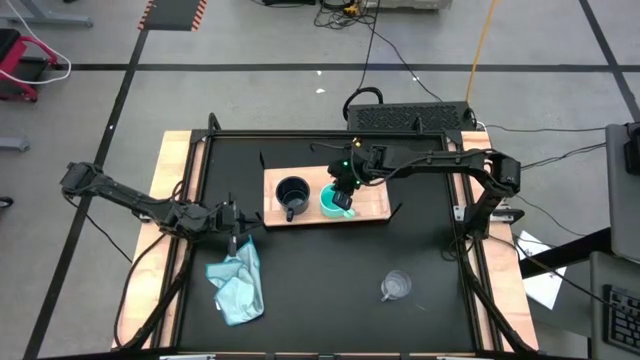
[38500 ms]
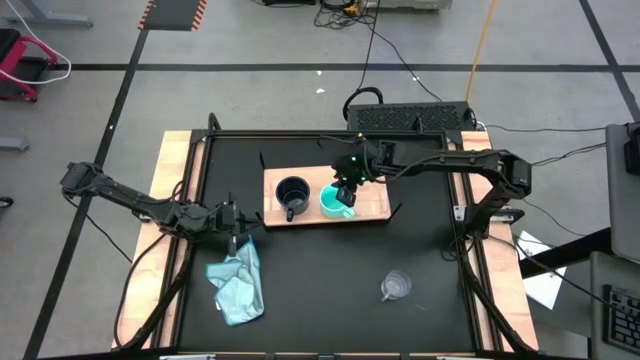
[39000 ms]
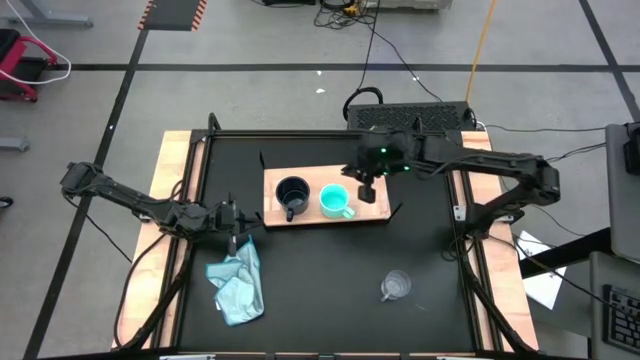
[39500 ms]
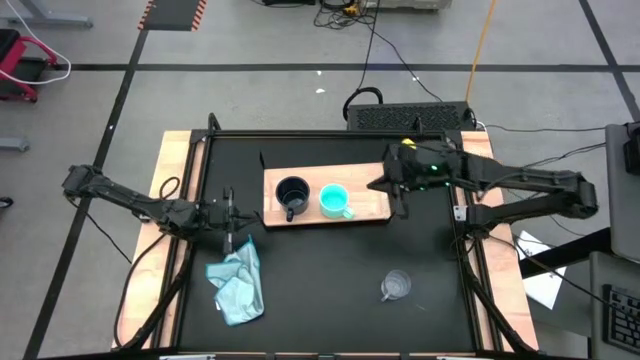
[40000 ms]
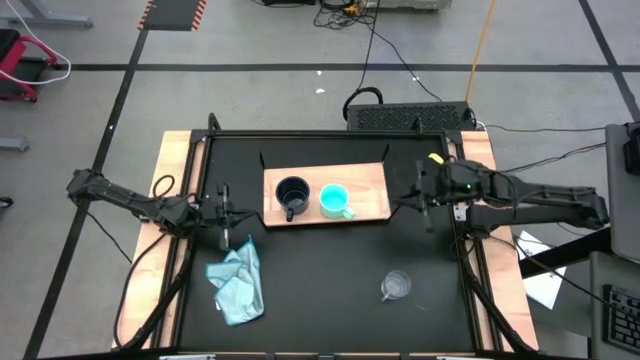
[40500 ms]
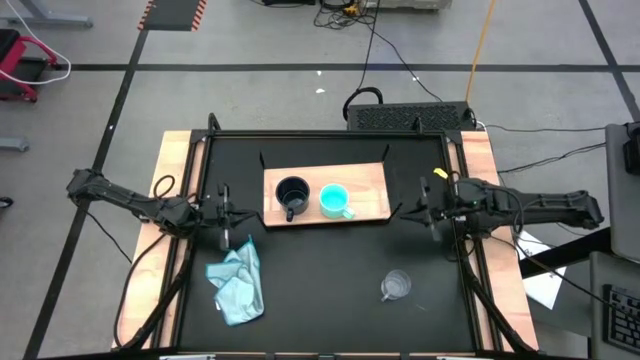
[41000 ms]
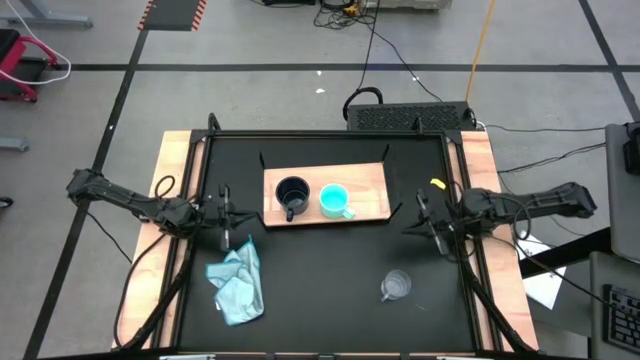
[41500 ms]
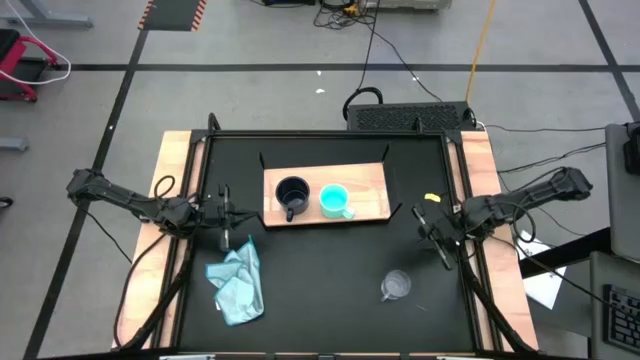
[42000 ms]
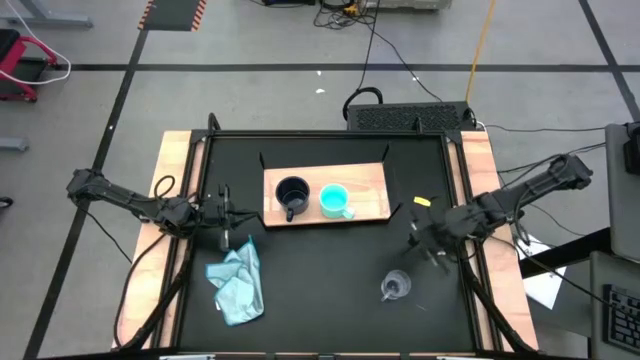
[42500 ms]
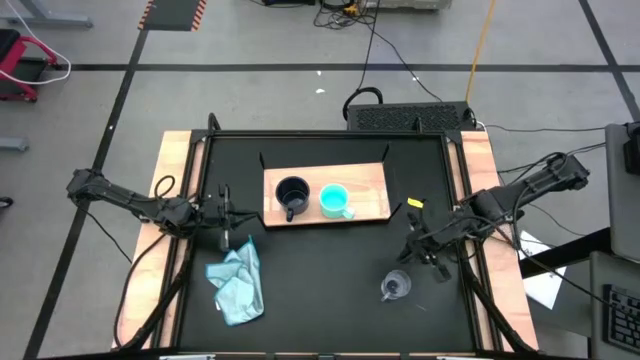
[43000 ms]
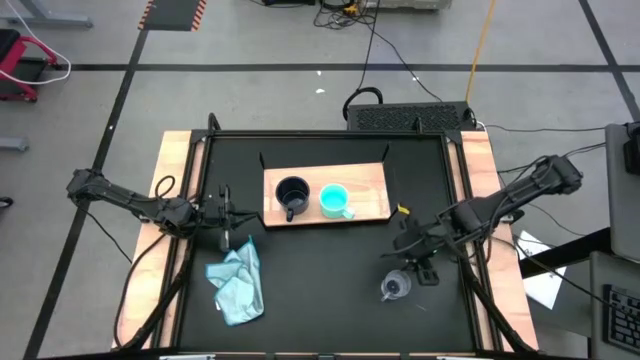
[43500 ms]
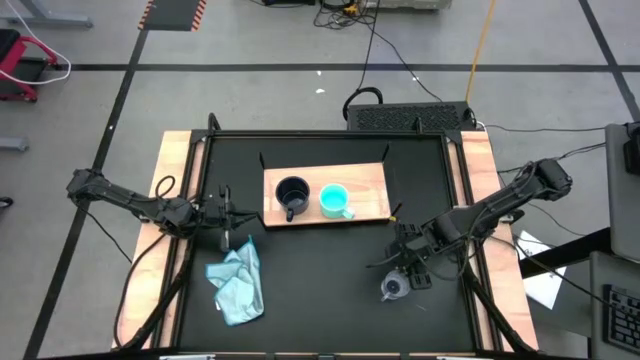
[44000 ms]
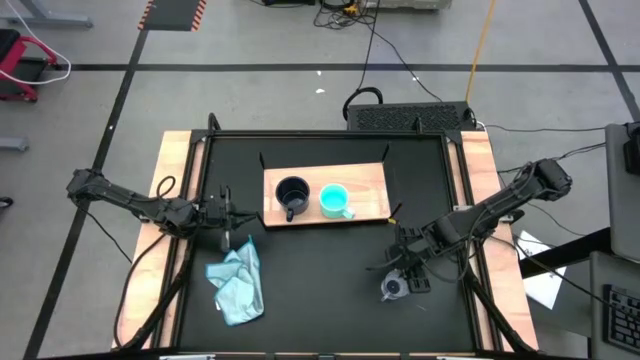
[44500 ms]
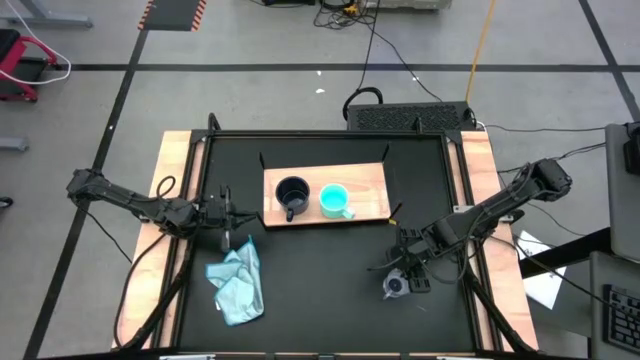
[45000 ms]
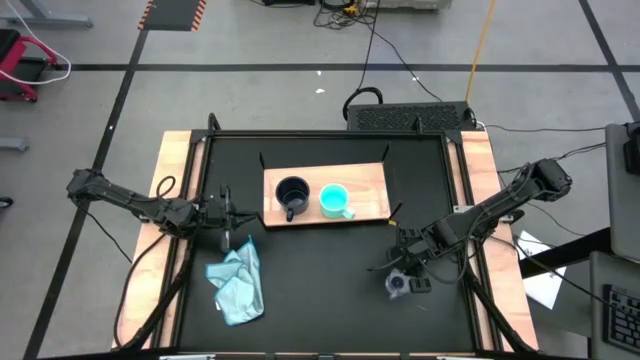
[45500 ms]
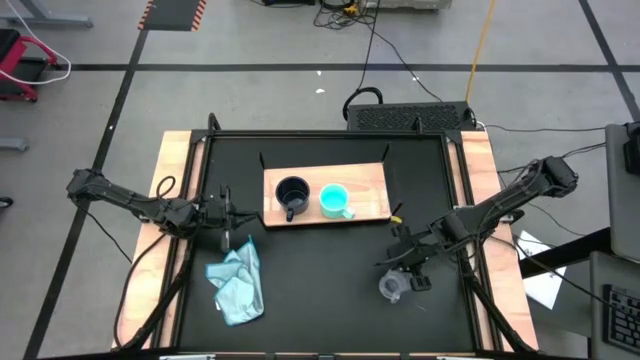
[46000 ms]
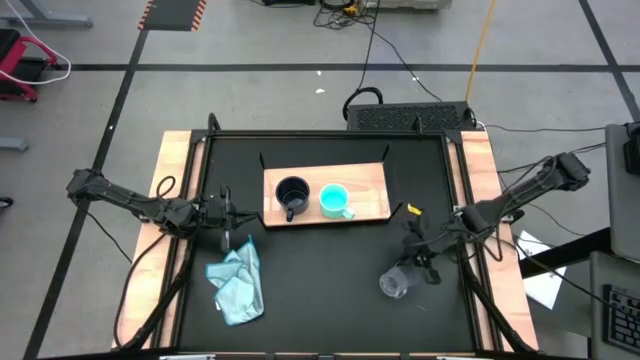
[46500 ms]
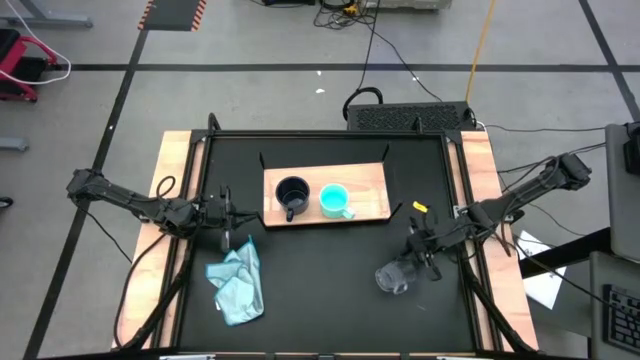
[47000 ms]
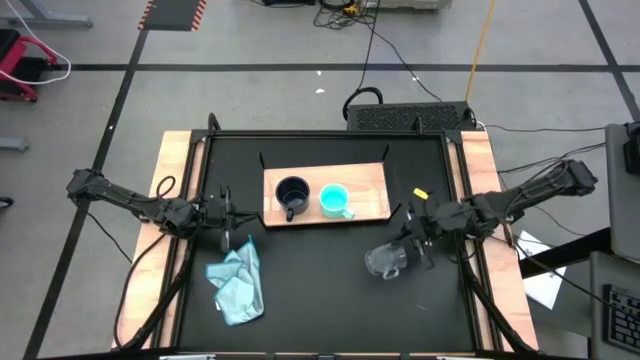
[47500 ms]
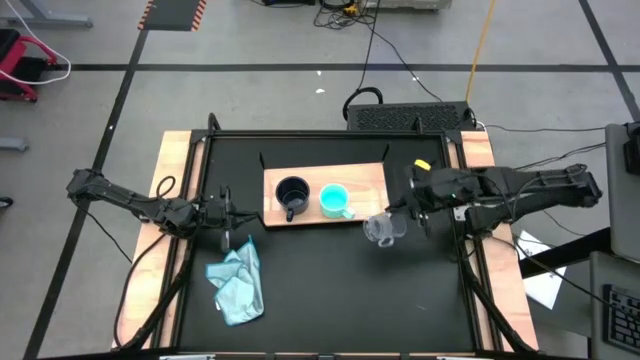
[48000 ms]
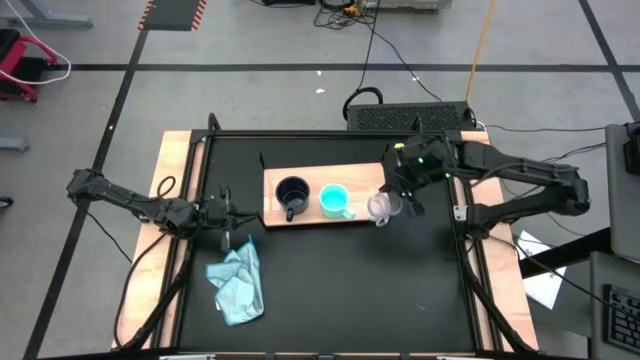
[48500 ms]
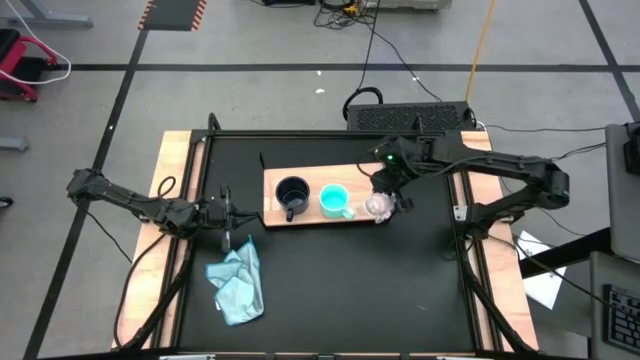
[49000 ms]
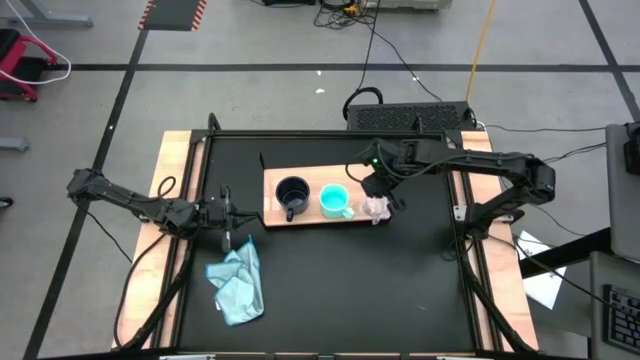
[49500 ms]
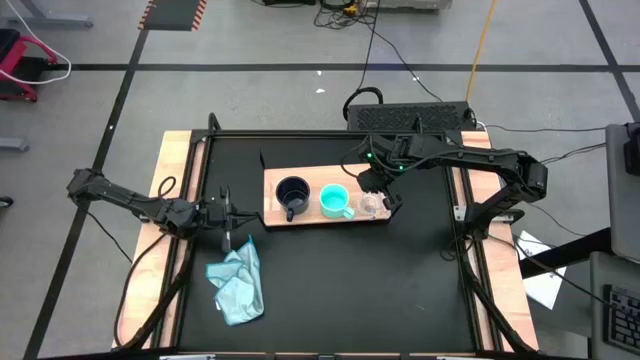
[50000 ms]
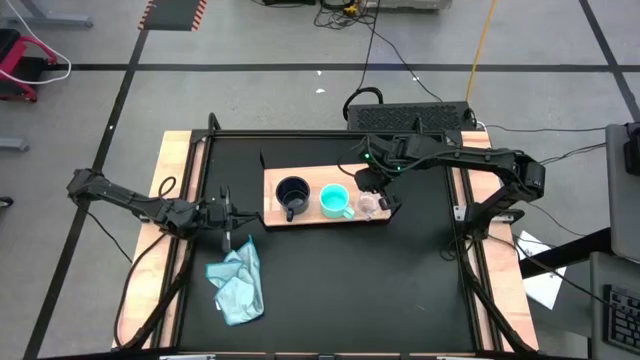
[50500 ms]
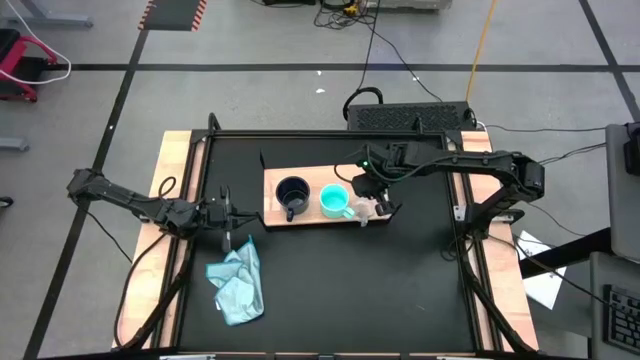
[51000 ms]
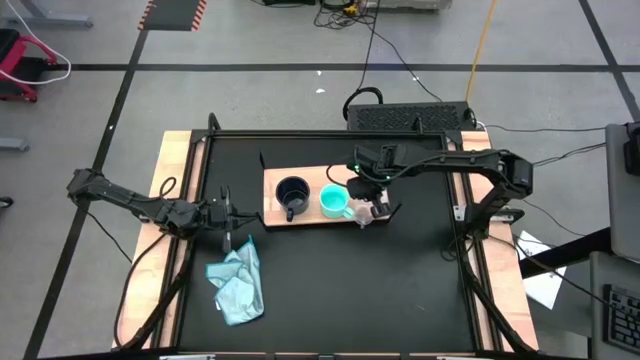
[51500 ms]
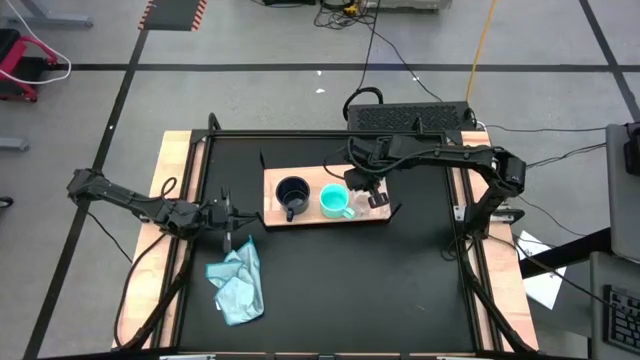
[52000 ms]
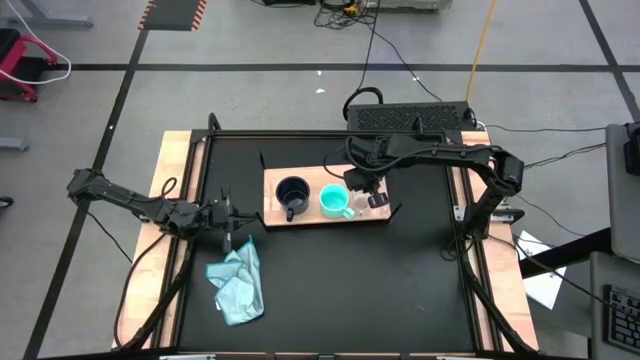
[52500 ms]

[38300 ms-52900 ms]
Task: Stack small to large cups/mugs on shelf
Put the transparent mug to the right of the light blue mug on the shelf

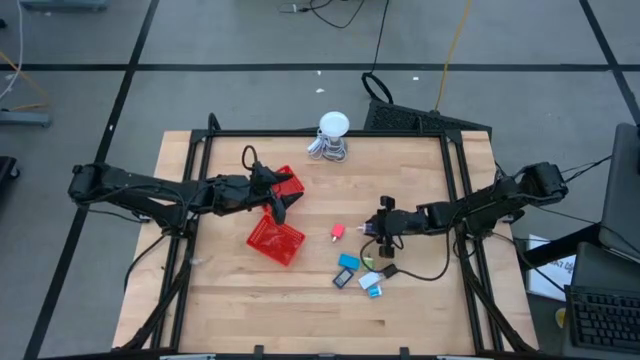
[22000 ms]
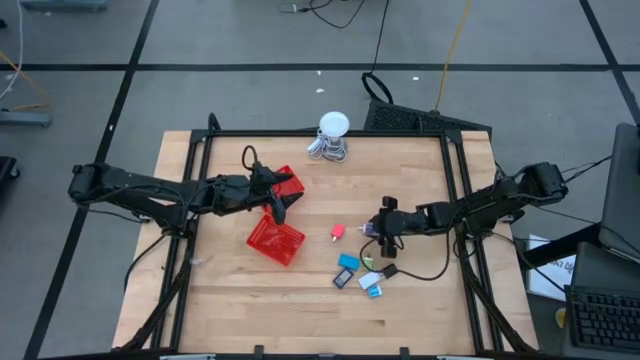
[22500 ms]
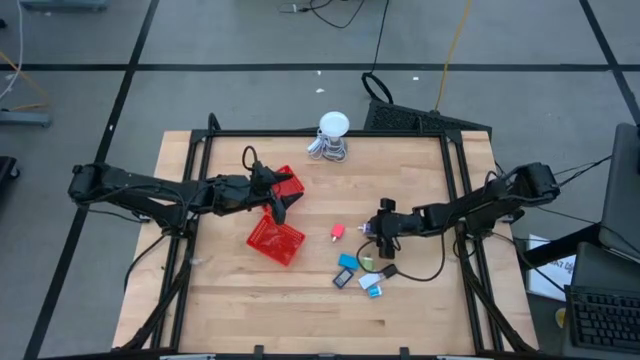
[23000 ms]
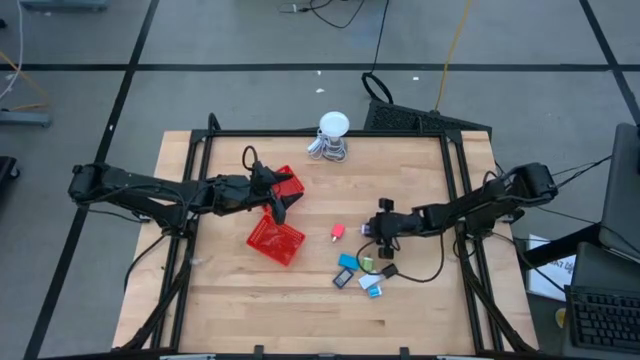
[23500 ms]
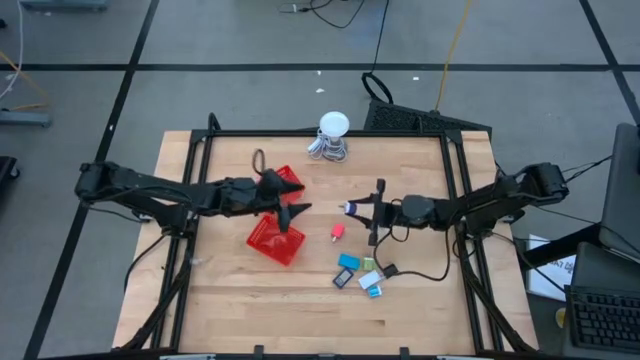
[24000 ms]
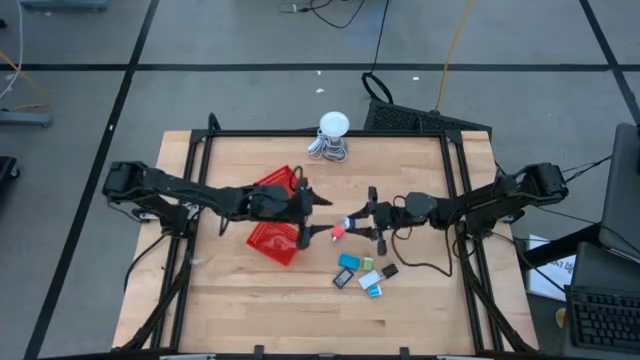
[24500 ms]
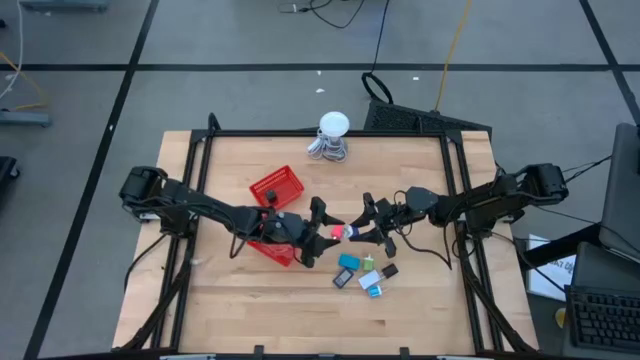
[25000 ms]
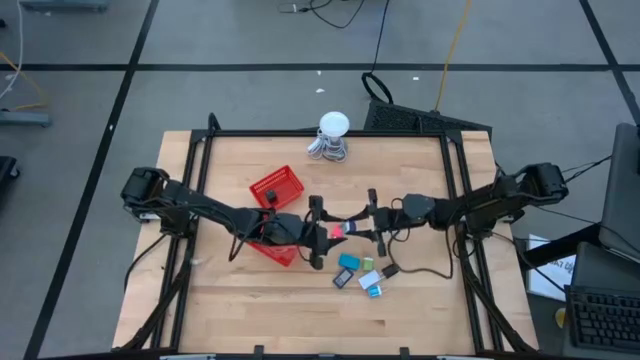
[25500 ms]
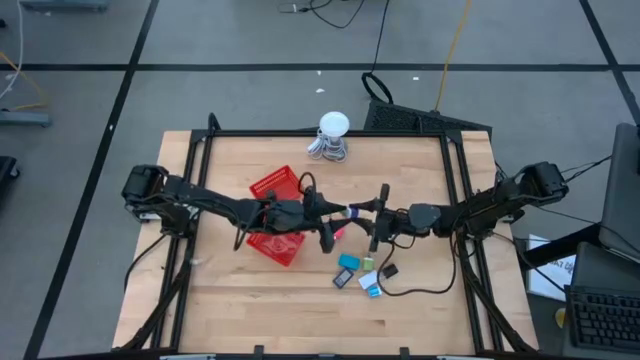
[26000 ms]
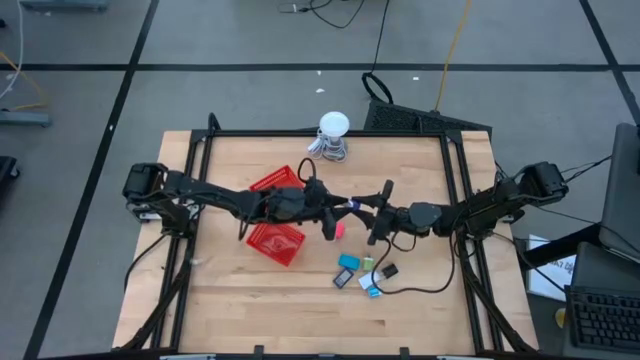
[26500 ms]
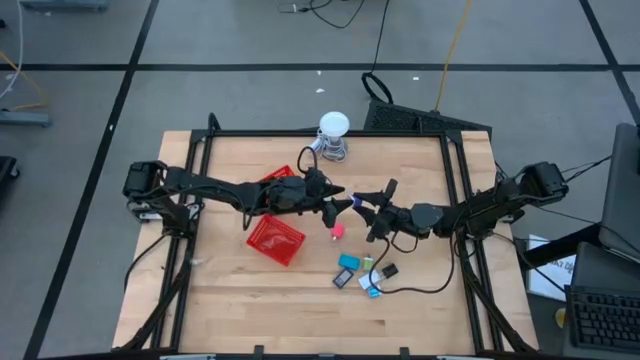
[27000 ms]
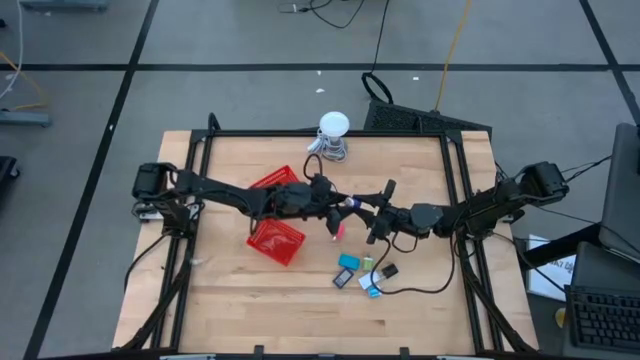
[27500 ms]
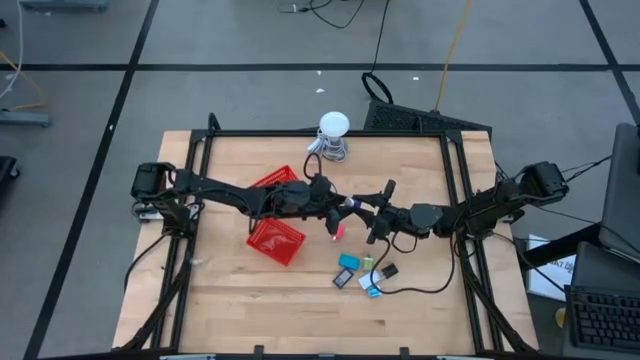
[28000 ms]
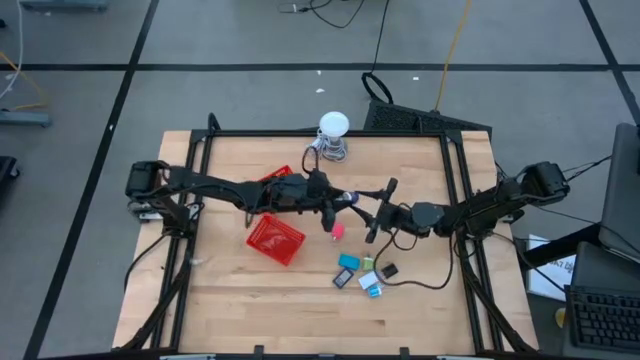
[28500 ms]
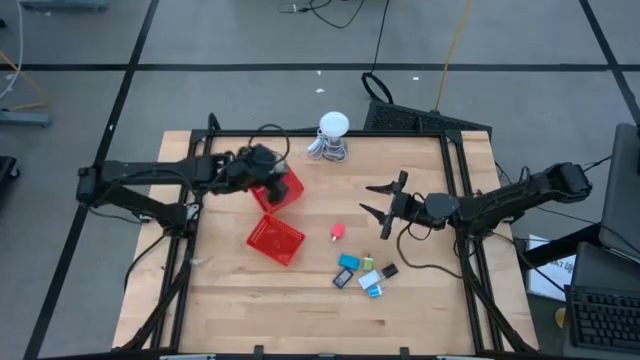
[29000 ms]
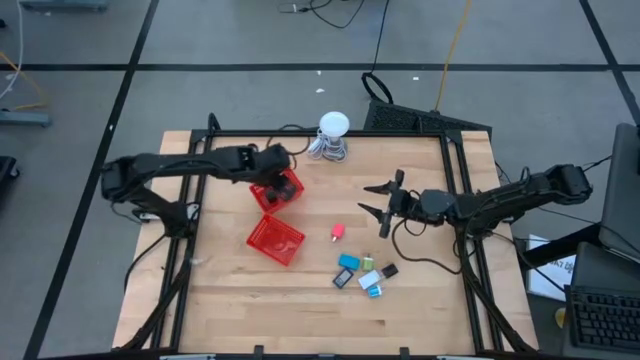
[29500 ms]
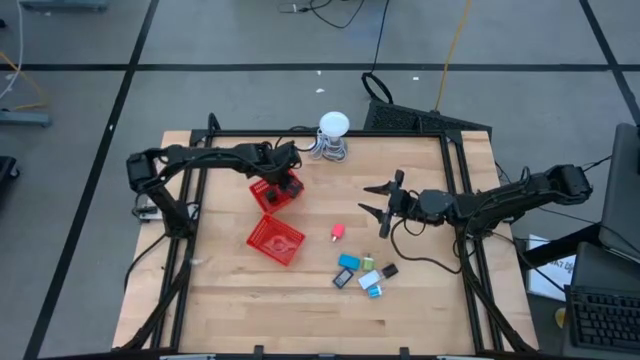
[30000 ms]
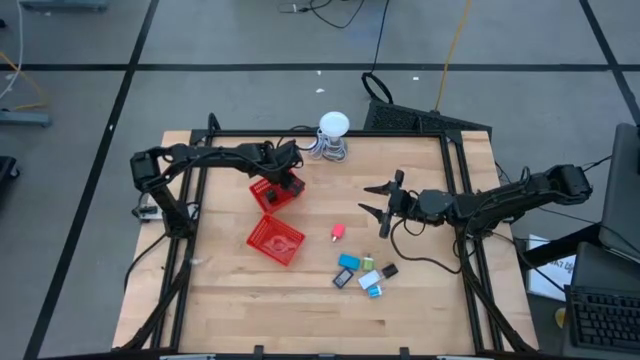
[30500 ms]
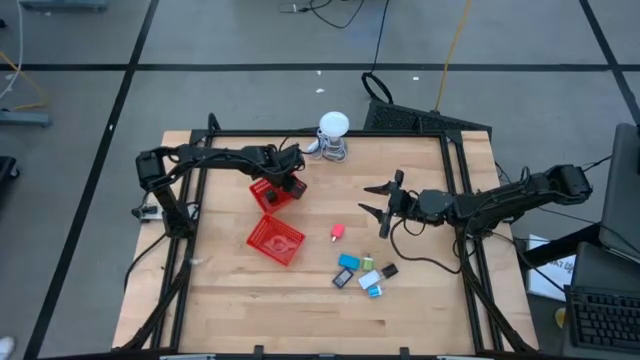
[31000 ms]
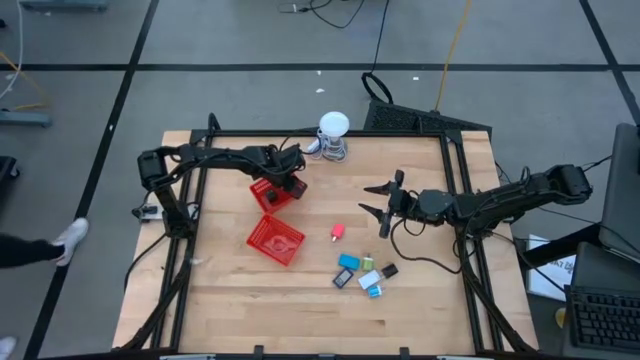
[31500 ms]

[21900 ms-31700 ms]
Task: Pick & Place Office items
Put the dark blue charger adapter into the top red basket
